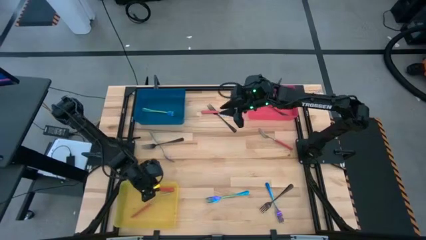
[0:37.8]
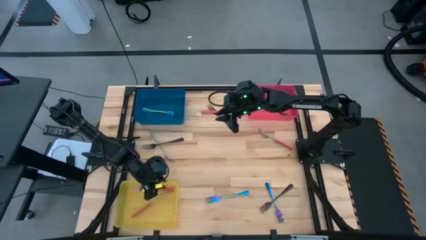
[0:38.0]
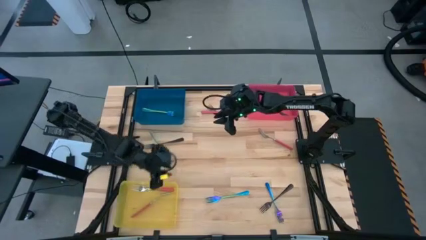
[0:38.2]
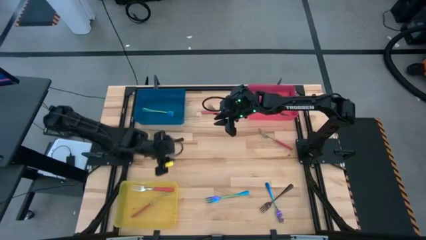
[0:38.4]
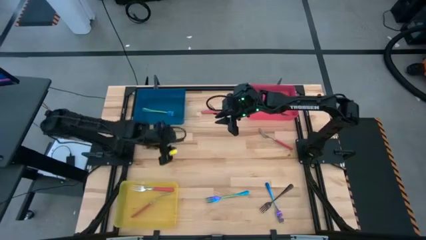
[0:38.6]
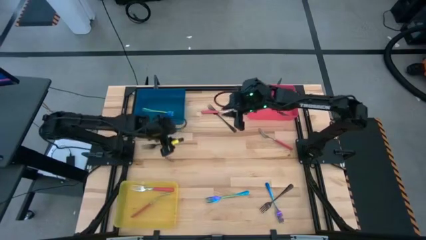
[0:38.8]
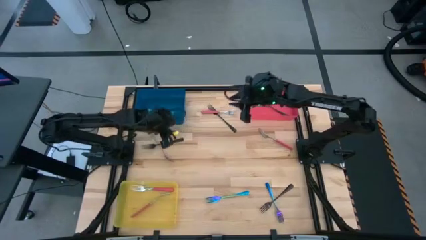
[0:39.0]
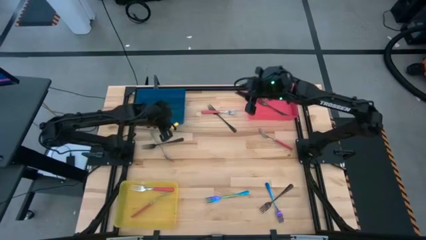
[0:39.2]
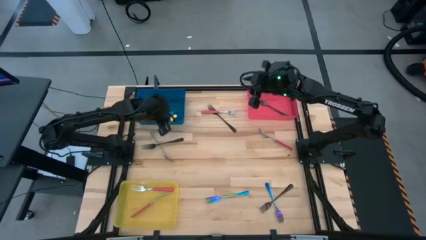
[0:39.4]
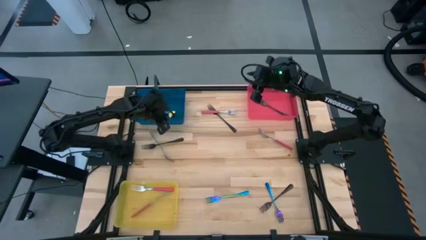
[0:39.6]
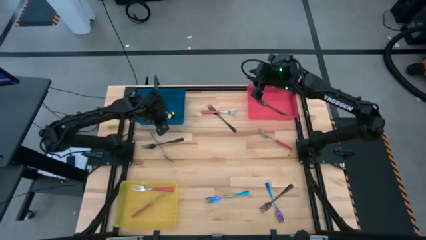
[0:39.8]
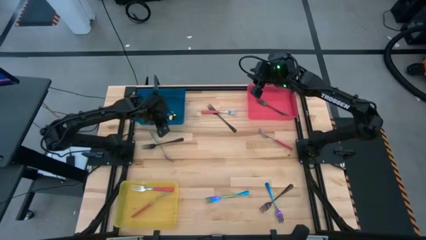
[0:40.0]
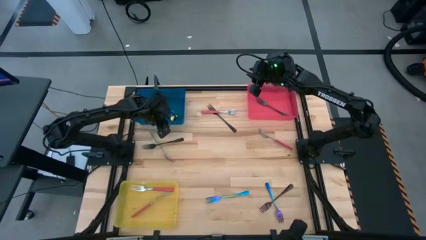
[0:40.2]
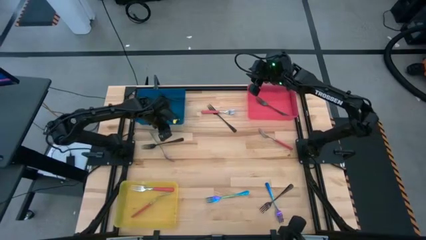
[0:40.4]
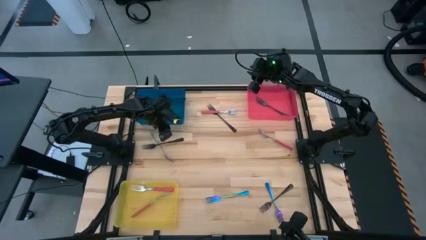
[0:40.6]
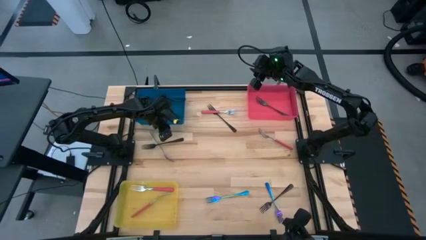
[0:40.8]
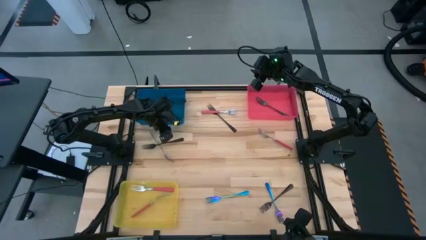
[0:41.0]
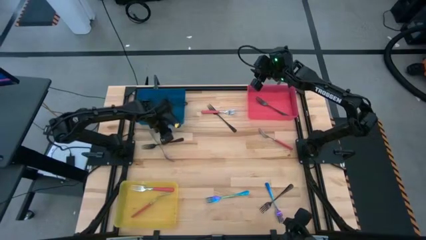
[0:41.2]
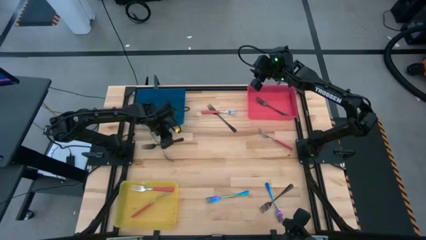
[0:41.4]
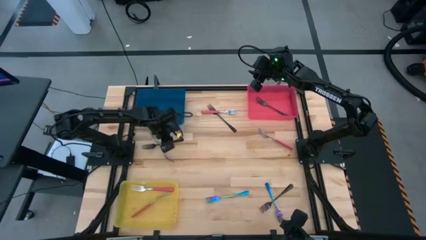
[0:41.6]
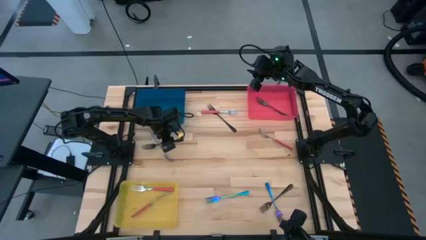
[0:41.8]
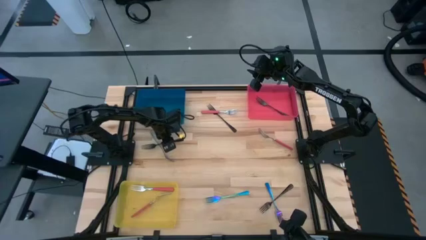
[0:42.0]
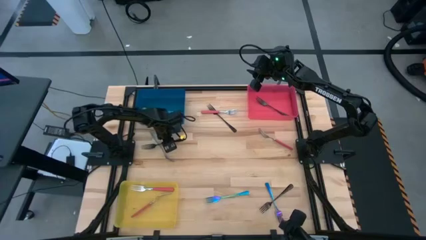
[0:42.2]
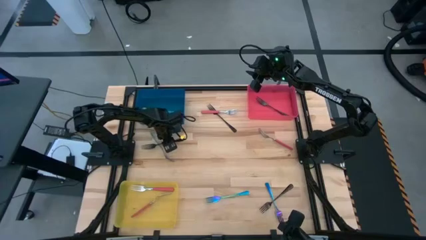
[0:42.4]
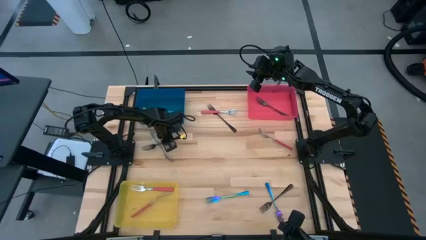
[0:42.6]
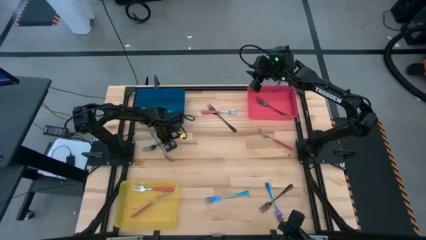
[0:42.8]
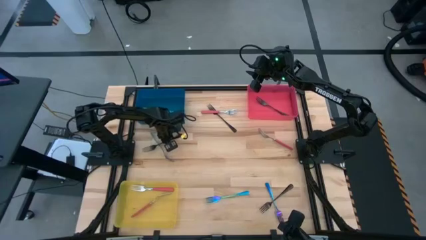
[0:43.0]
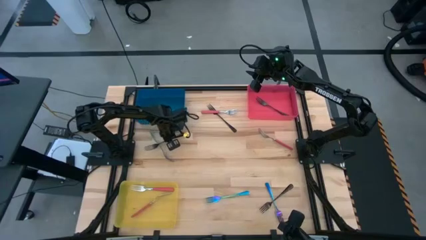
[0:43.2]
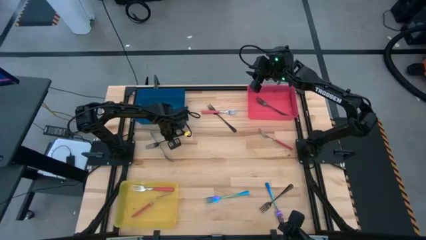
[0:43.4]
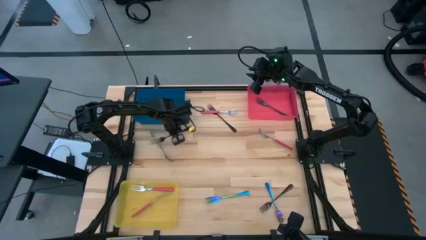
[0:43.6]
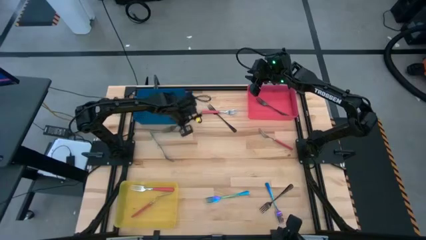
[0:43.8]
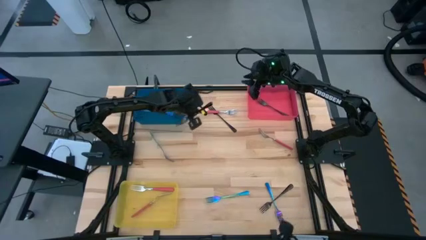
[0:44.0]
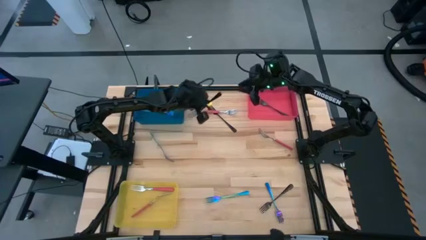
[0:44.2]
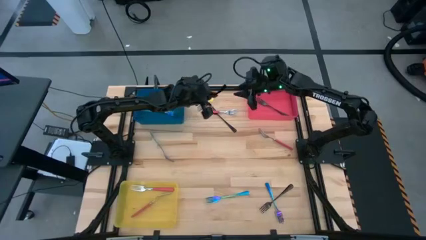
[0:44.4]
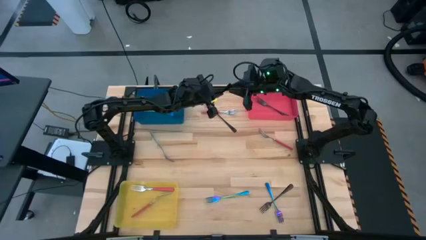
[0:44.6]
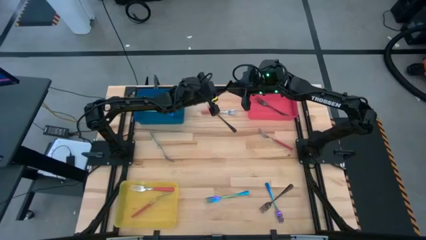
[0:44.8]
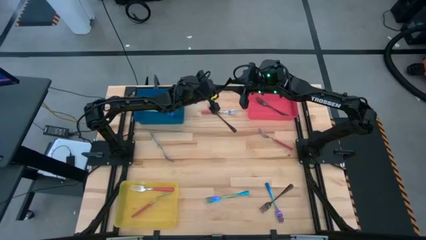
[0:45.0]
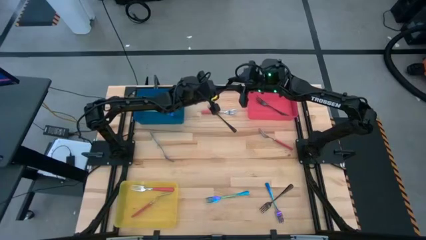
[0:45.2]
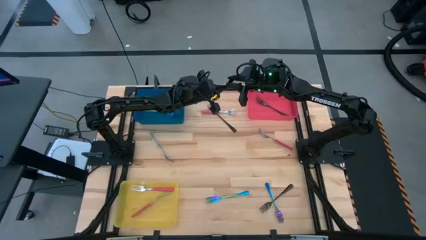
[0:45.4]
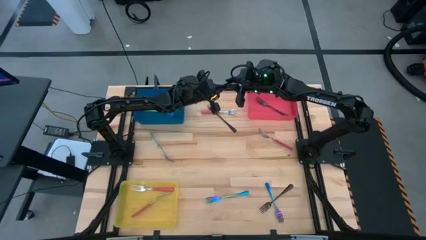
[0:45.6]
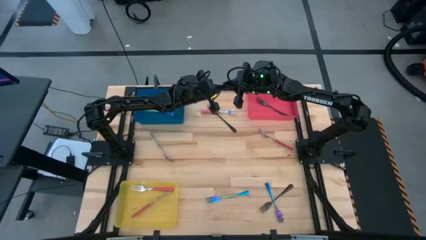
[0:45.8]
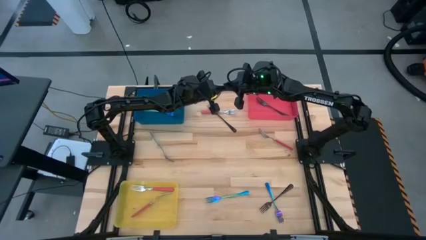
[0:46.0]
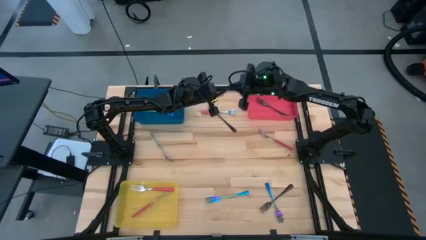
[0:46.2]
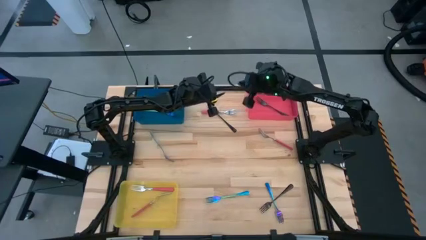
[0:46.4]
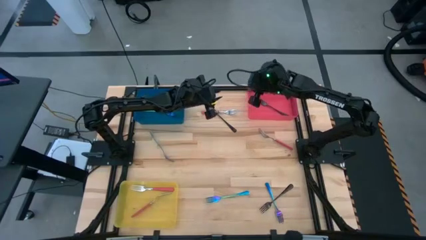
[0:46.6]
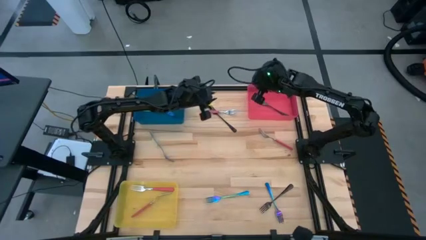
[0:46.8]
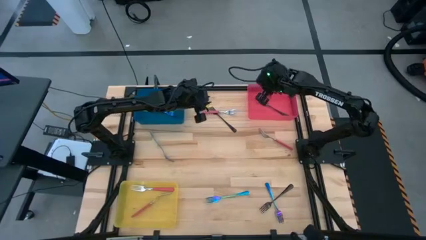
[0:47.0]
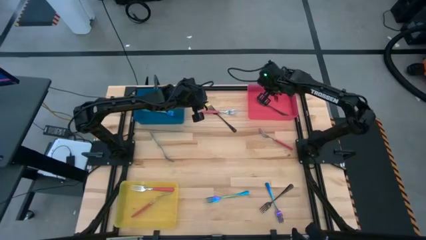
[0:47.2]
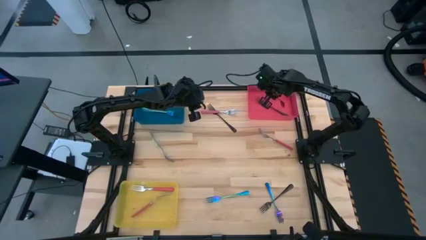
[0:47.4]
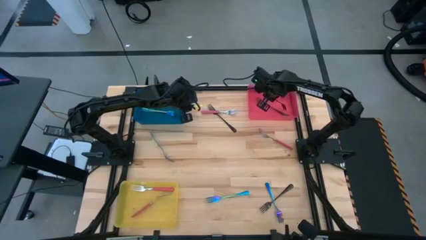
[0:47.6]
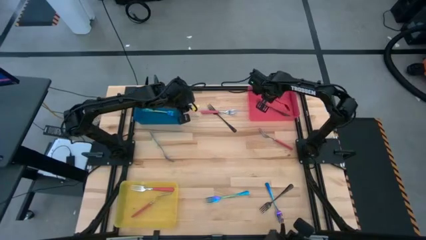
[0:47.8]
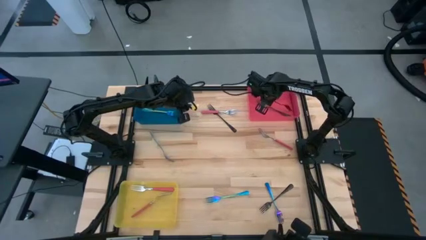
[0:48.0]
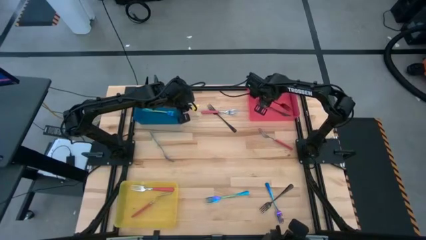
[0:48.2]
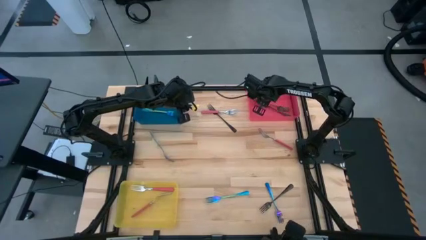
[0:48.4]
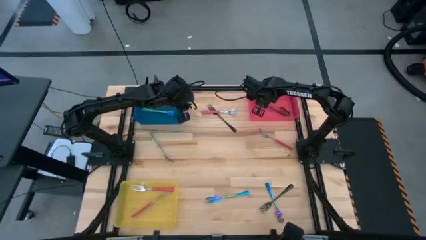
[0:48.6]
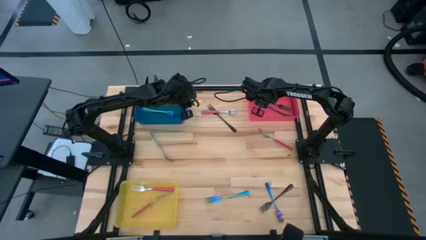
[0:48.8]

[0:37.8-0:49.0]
Task: Sort silverware by color (type)
Put the middle left black fork in to the red bin

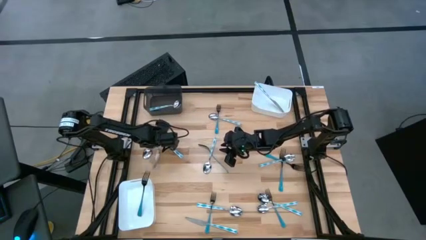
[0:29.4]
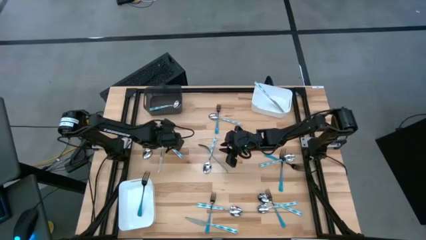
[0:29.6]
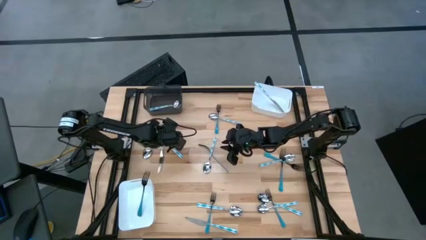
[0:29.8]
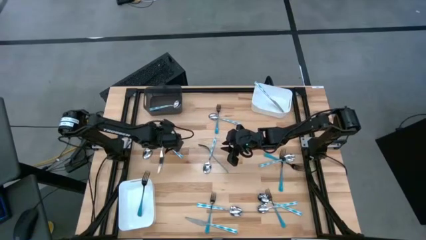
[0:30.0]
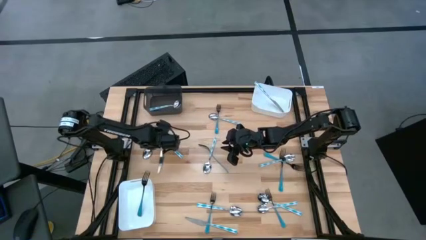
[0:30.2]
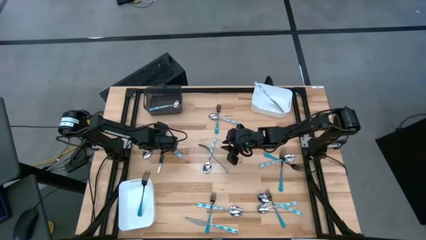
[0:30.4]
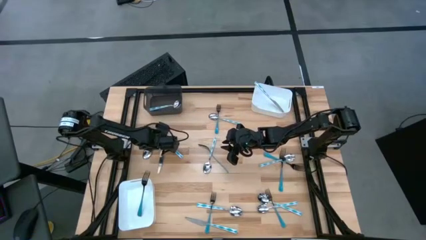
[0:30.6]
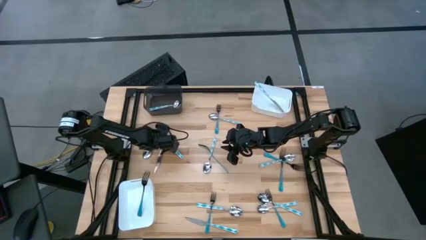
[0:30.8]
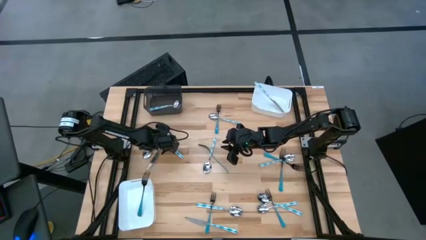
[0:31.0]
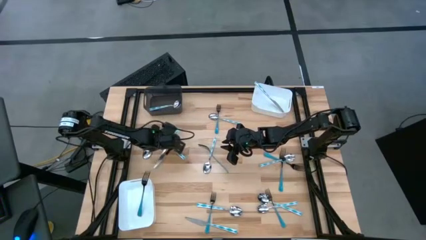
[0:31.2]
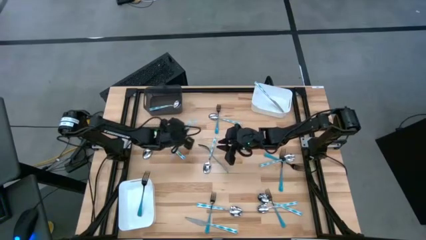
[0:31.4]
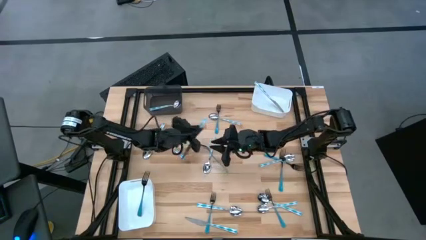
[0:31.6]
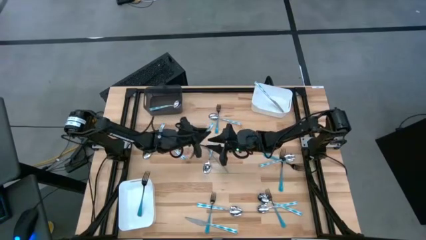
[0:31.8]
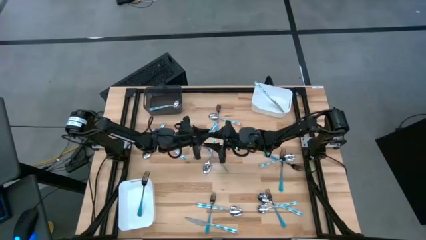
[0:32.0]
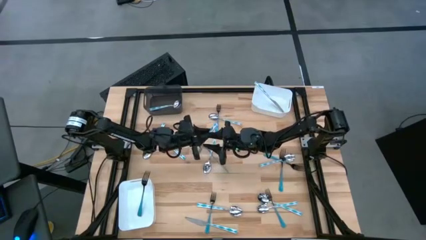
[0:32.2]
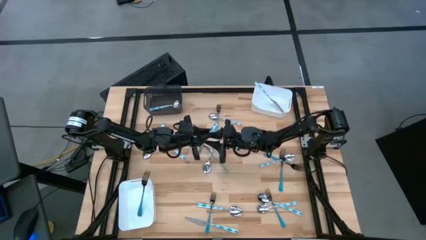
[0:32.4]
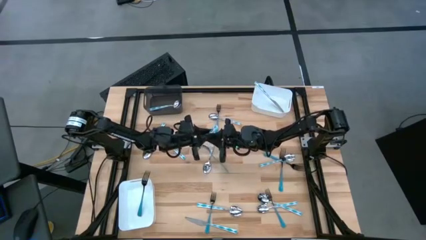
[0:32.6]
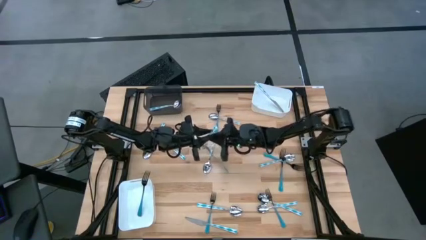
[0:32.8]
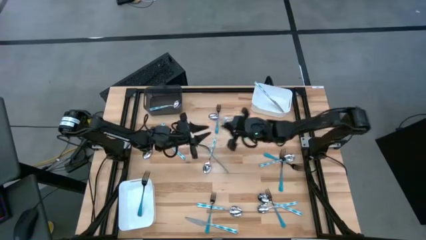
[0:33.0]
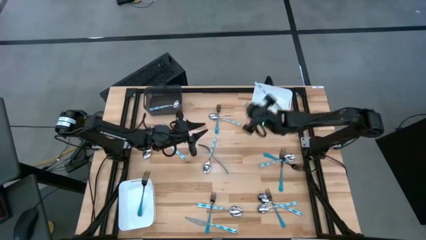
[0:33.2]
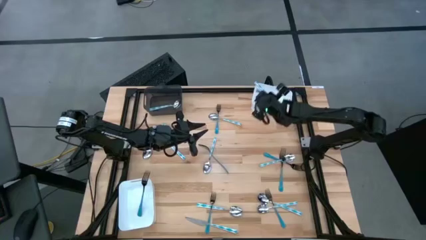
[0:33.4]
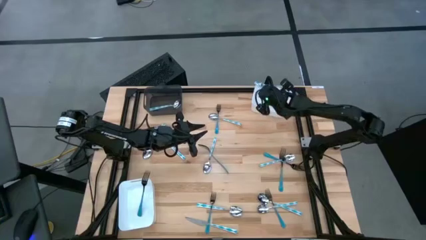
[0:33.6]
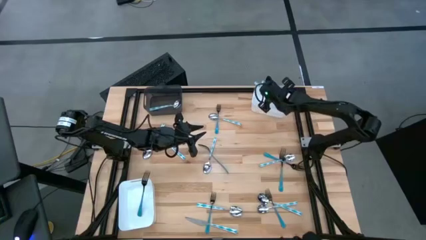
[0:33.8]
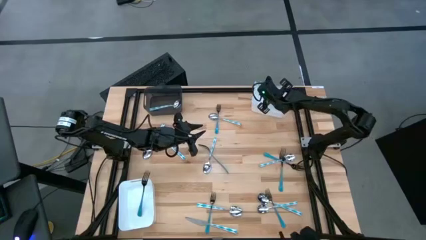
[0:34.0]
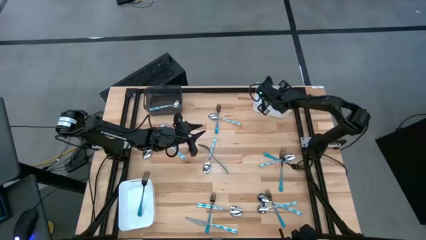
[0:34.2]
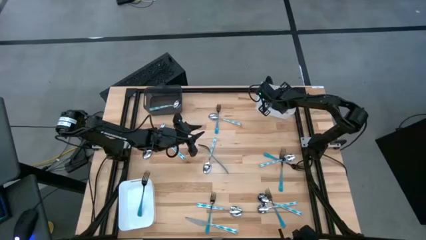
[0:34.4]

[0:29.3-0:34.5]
Task: Sort silverware by color (type)
Put the blue patterned table knife into the top white bin
